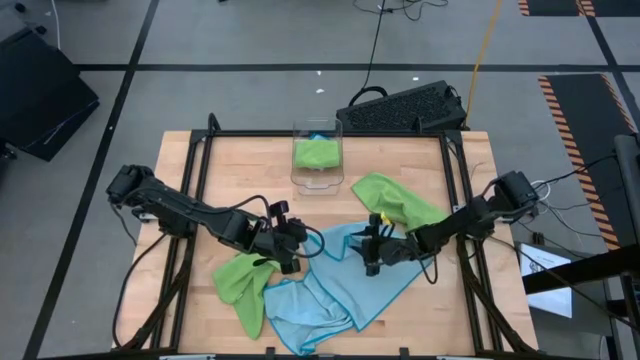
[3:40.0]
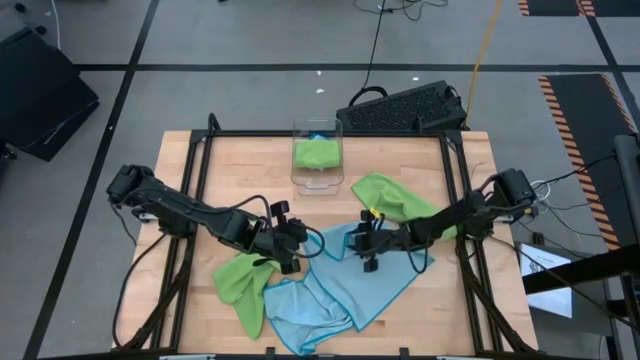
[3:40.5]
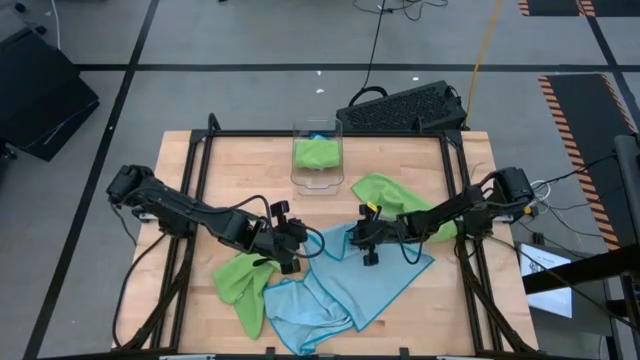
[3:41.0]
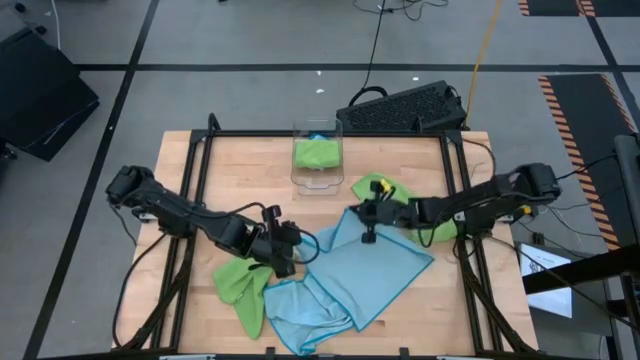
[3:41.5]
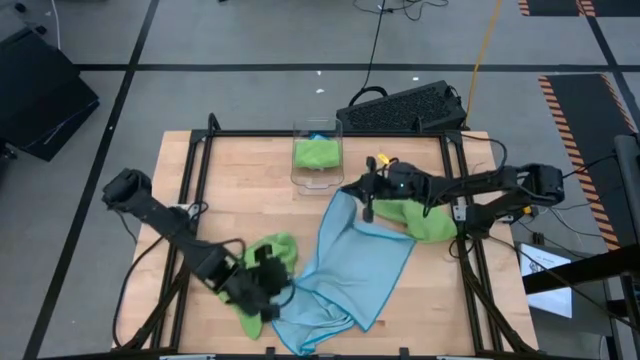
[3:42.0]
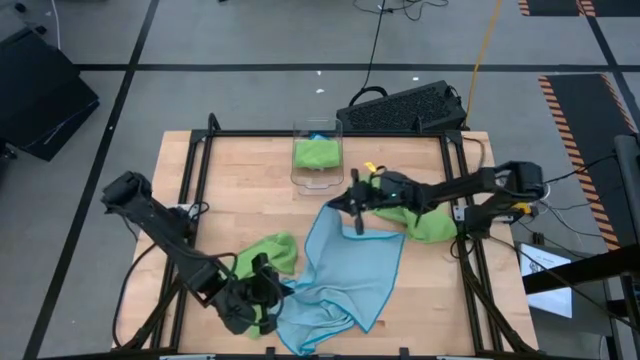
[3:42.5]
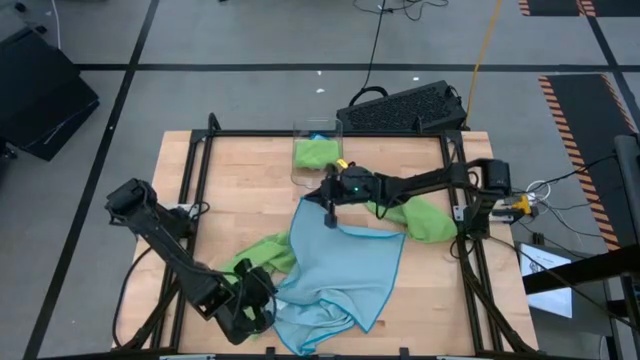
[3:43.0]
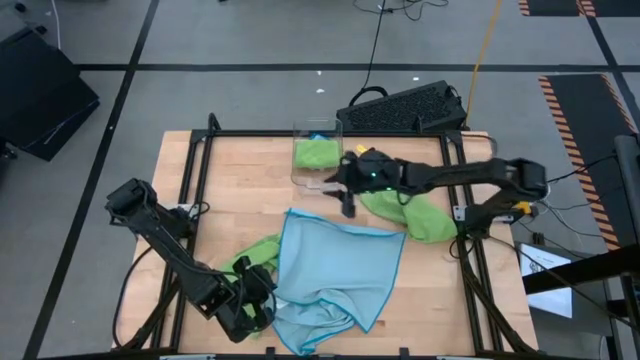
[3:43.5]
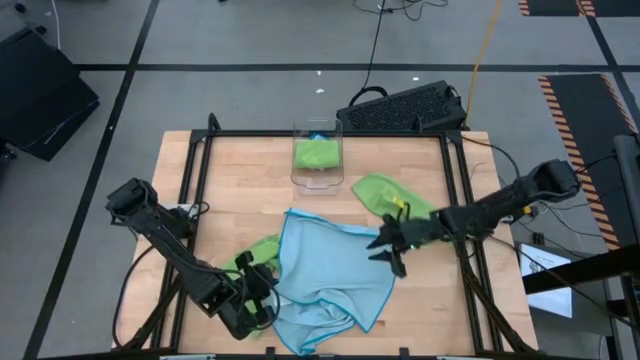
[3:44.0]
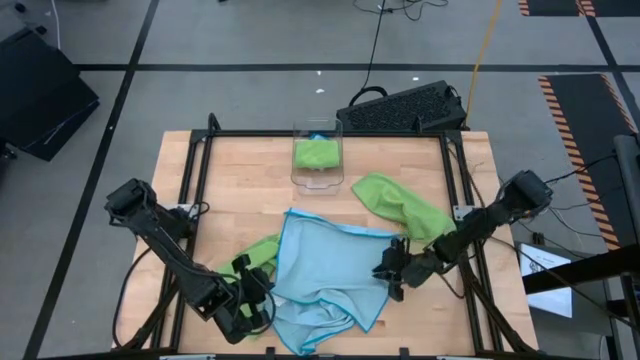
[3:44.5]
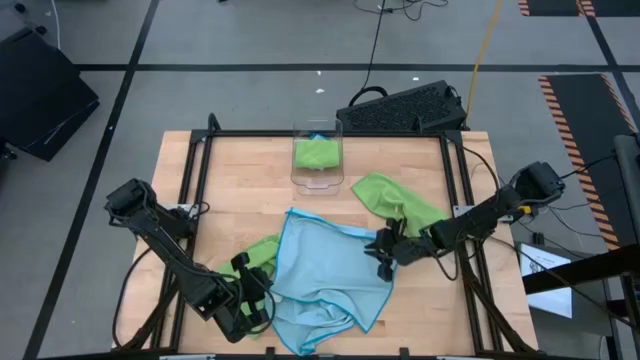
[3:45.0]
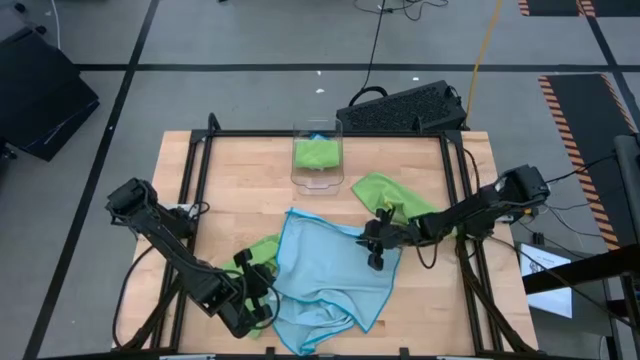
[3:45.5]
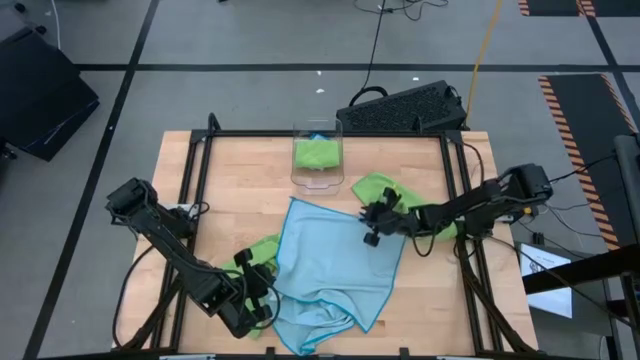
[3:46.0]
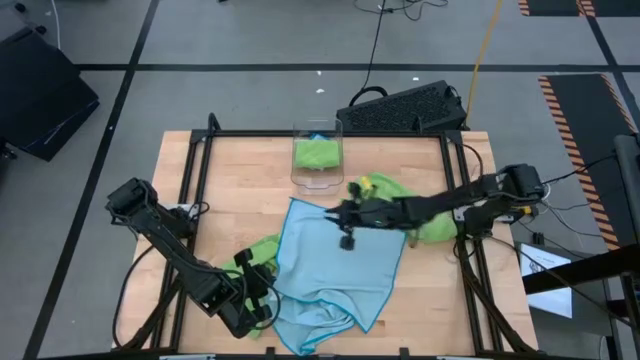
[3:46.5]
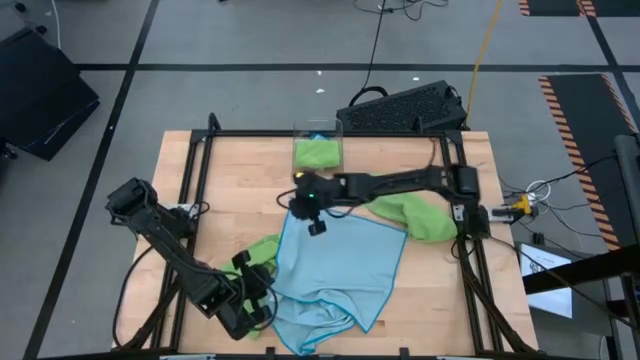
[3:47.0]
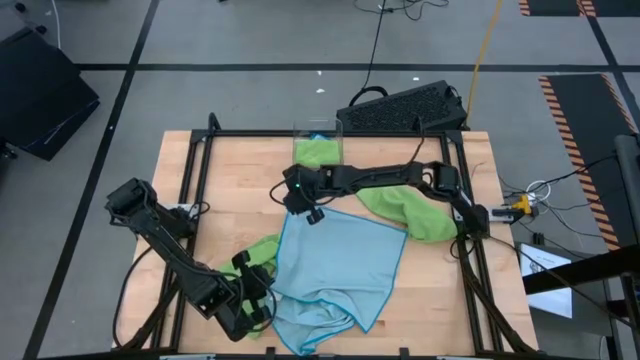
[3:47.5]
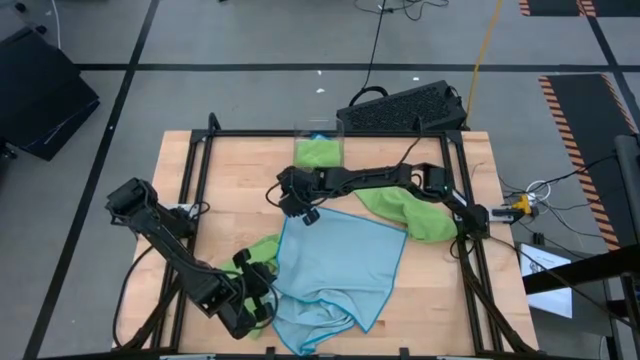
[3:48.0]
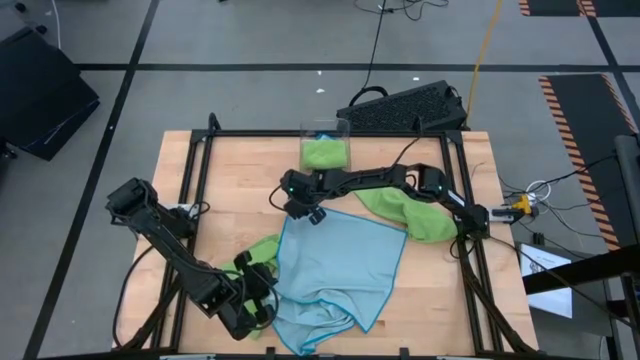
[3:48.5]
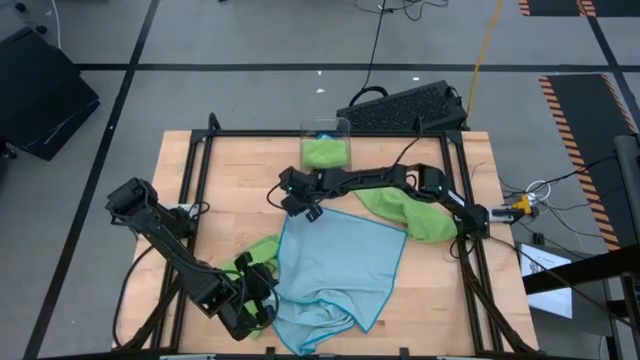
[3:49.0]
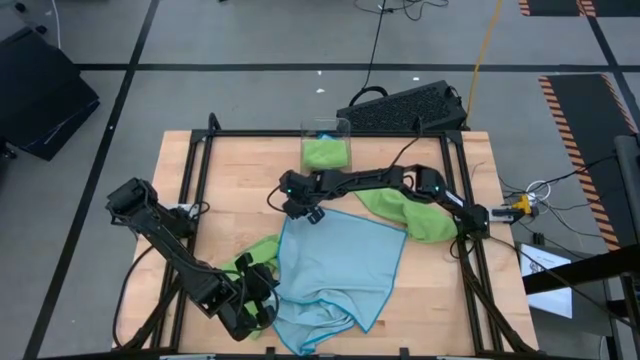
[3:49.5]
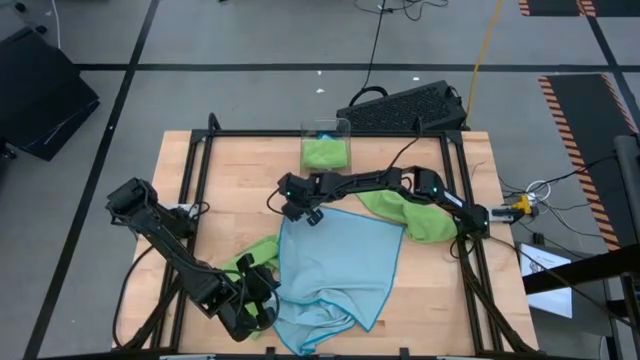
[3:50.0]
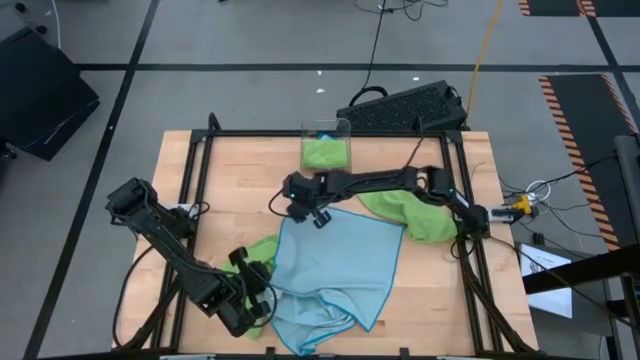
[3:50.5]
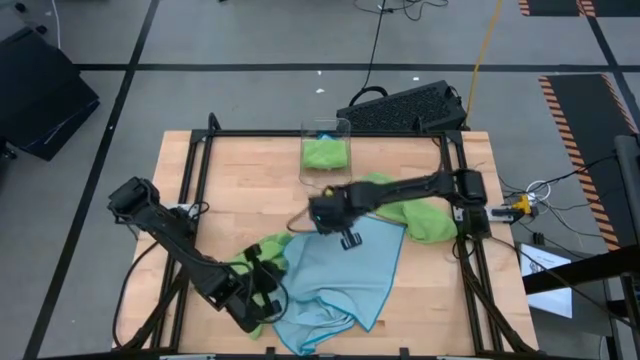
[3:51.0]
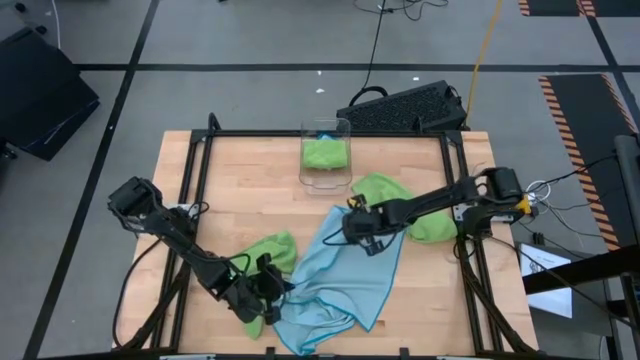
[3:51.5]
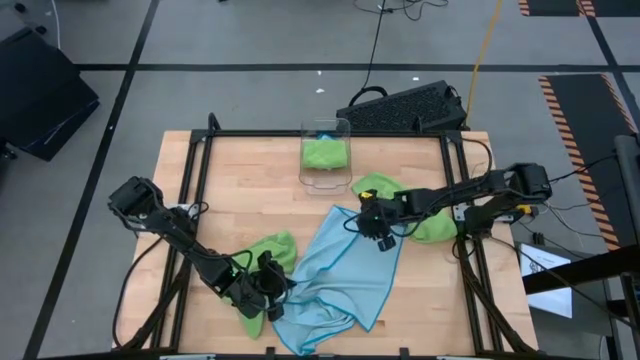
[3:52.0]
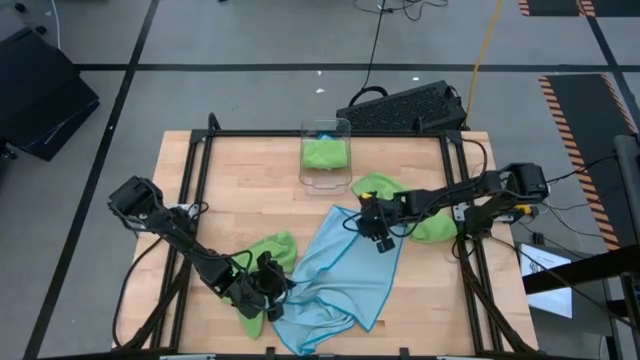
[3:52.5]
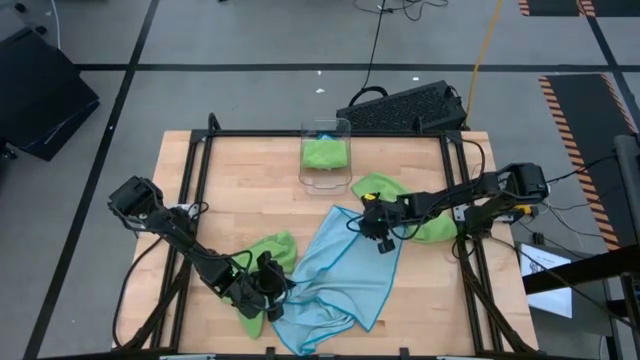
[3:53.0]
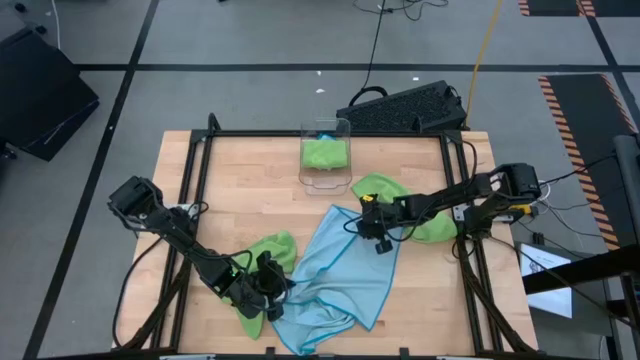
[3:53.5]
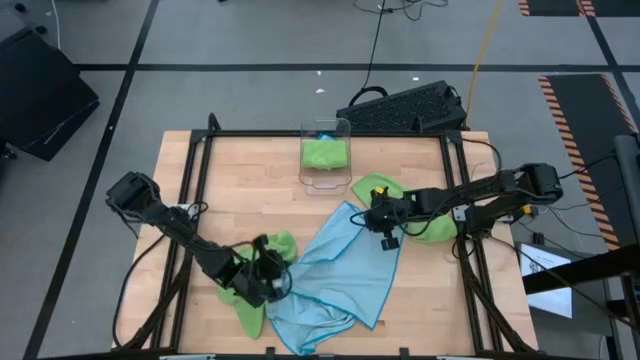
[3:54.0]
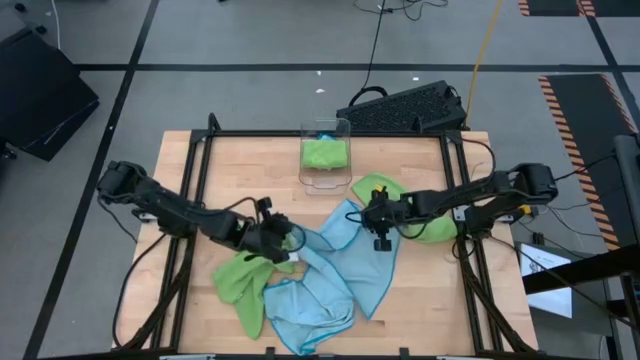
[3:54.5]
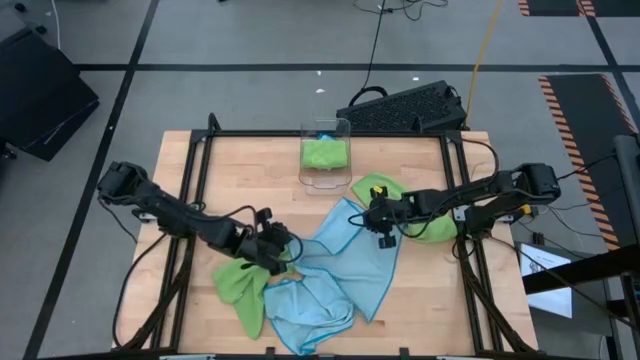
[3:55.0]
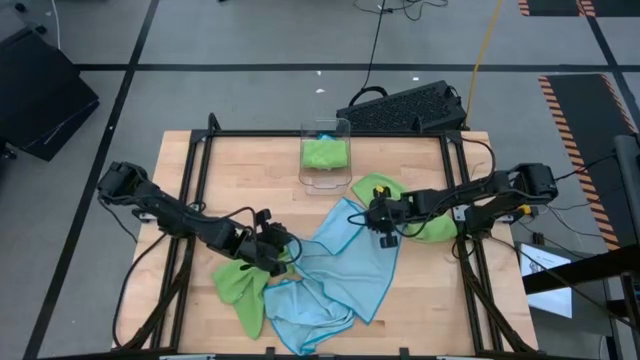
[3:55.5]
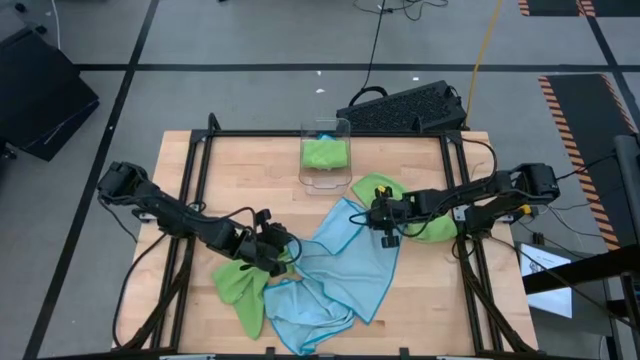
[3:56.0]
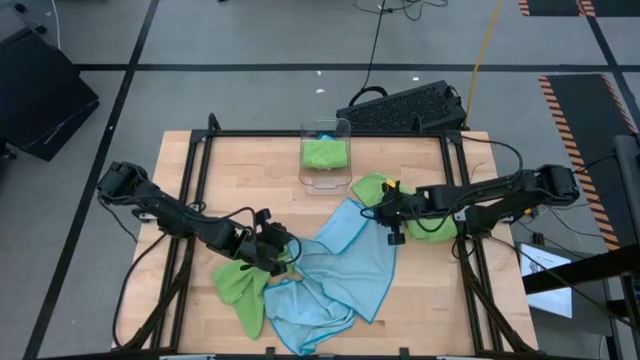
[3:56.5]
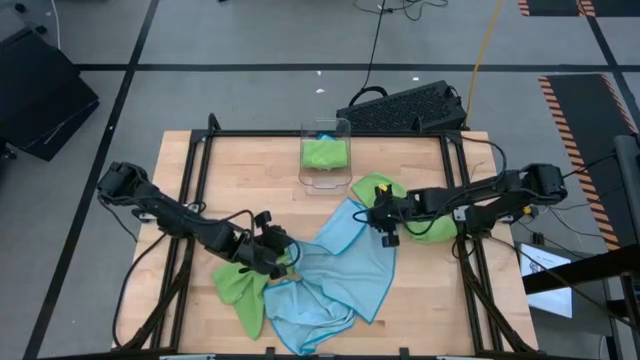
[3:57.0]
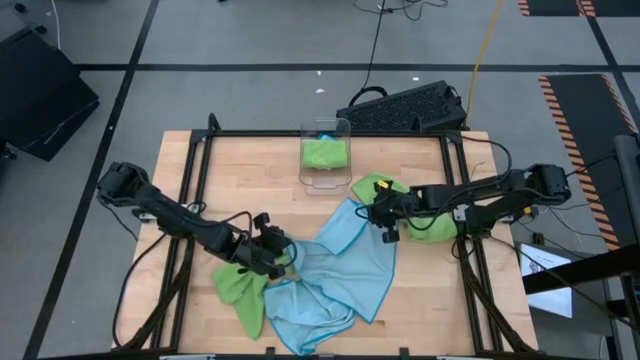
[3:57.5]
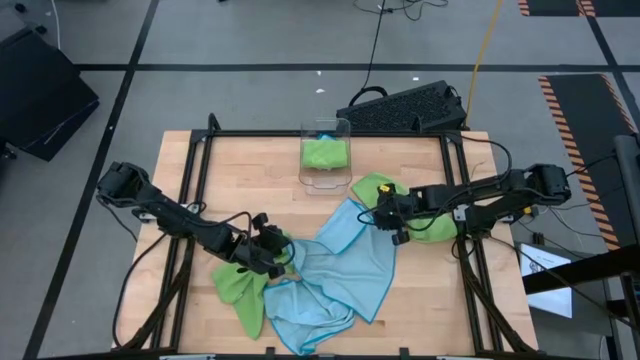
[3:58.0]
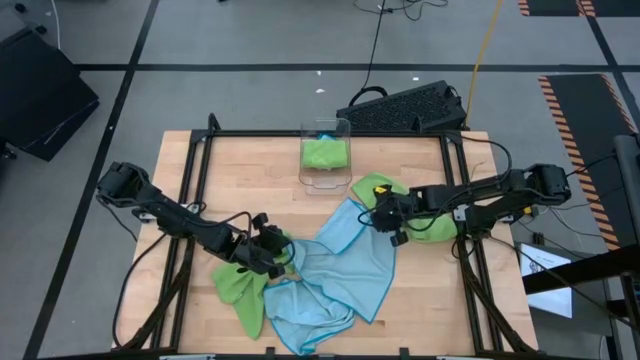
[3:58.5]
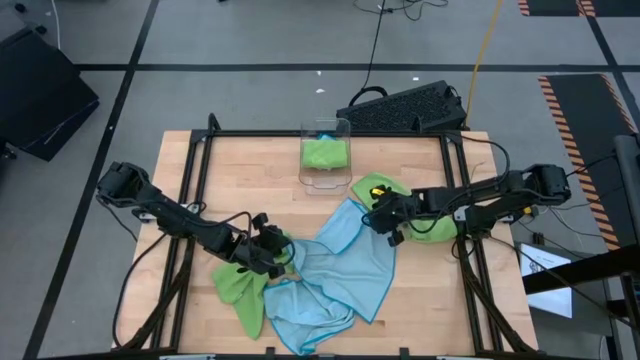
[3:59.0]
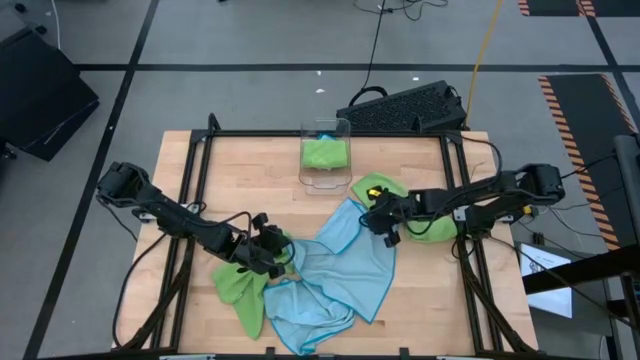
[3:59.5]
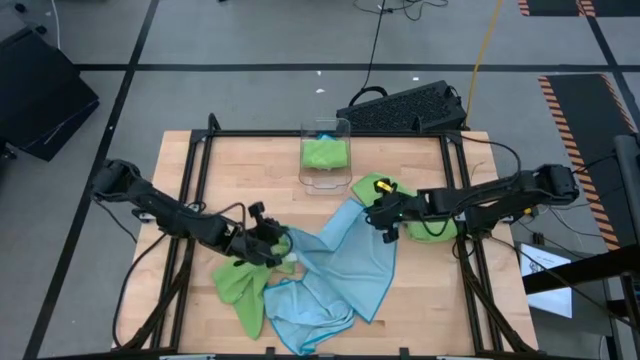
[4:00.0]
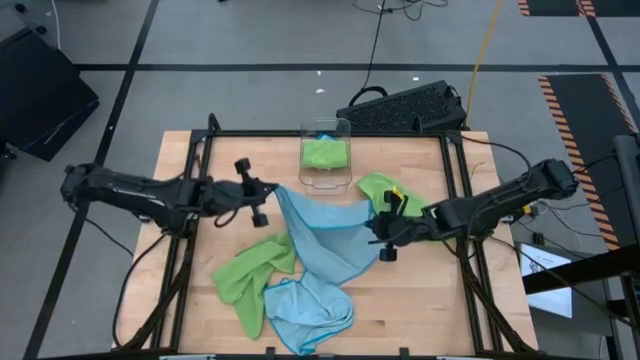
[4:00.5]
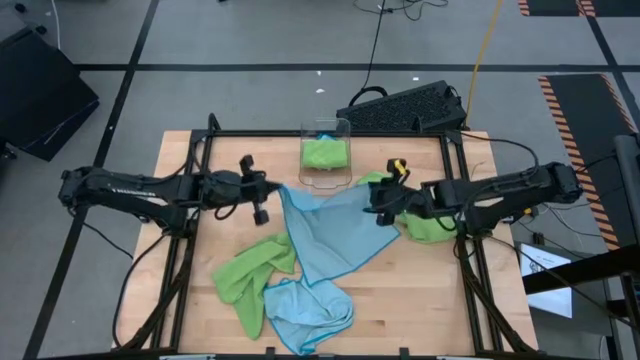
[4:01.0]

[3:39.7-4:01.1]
Task: Fold microfiber towels
Fold the right blue towel
